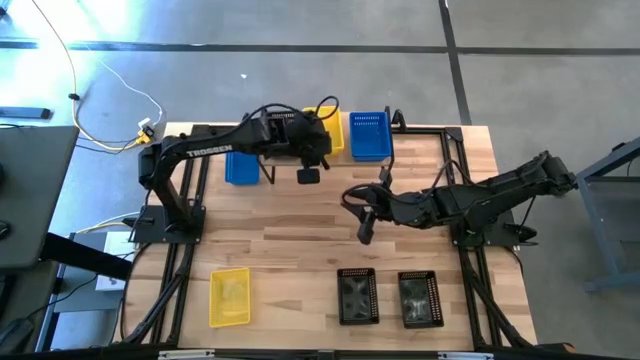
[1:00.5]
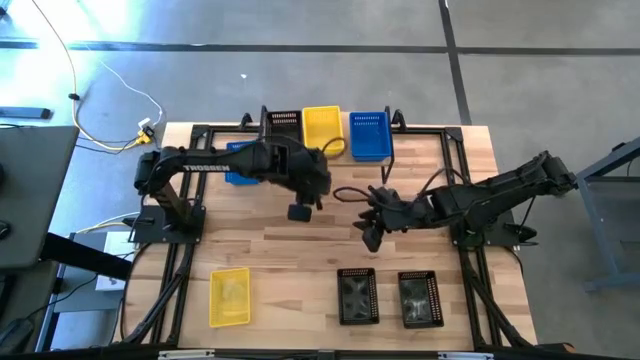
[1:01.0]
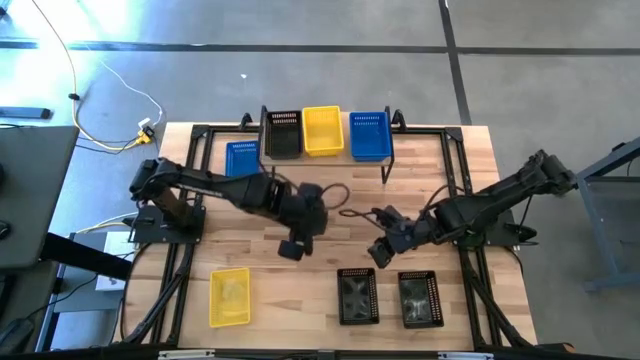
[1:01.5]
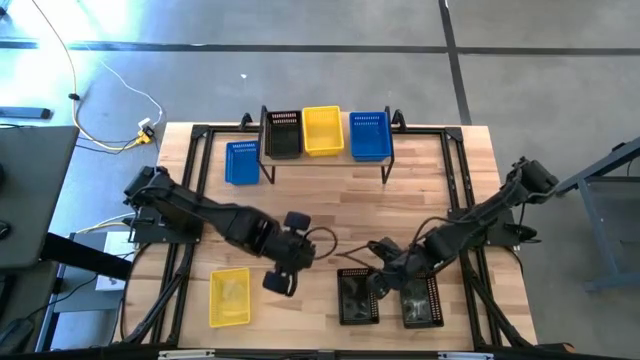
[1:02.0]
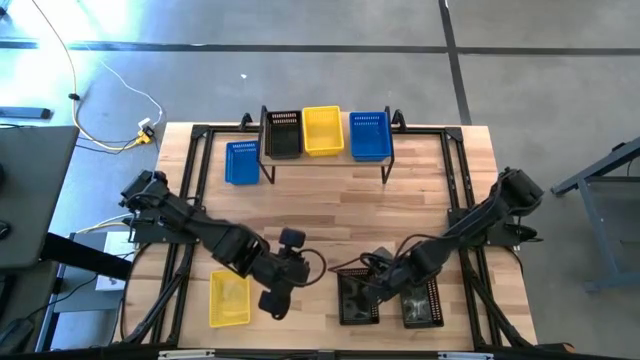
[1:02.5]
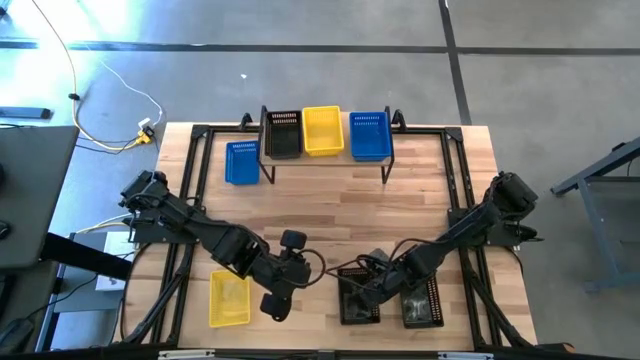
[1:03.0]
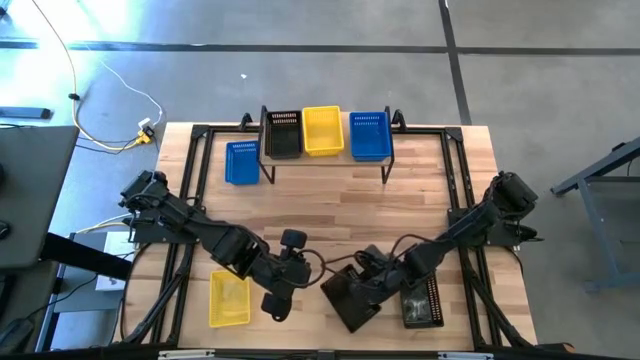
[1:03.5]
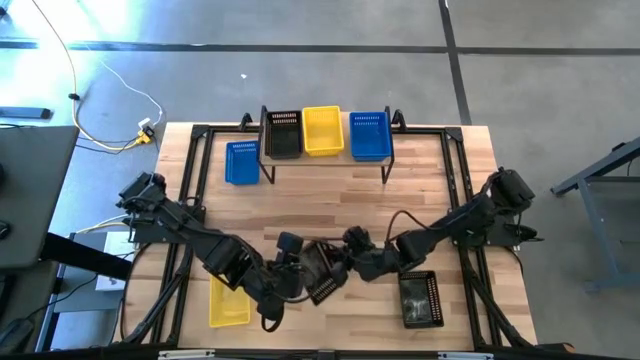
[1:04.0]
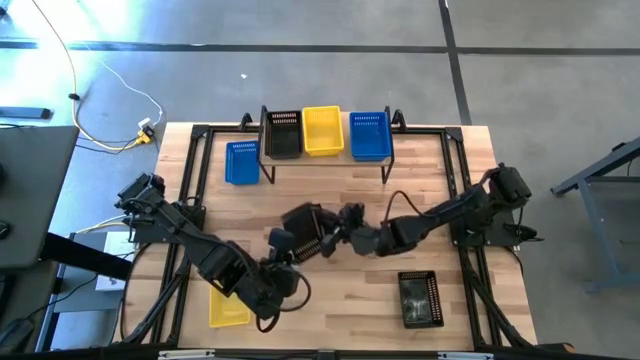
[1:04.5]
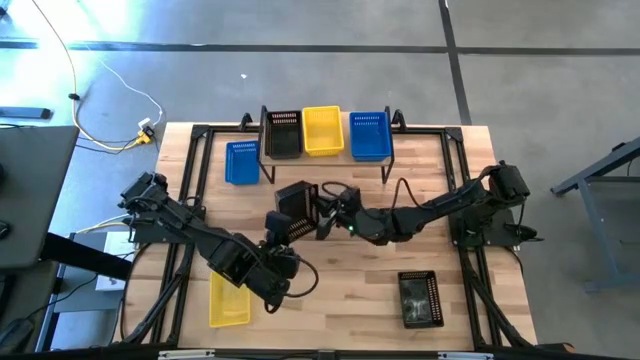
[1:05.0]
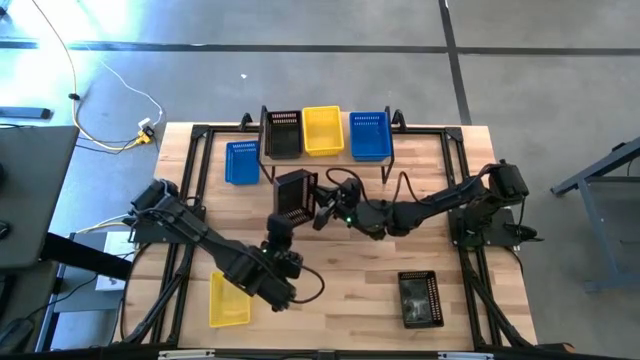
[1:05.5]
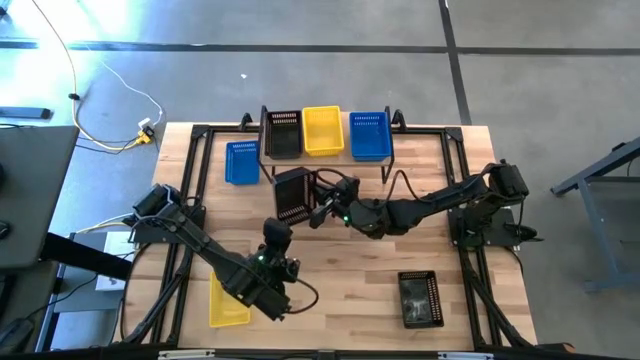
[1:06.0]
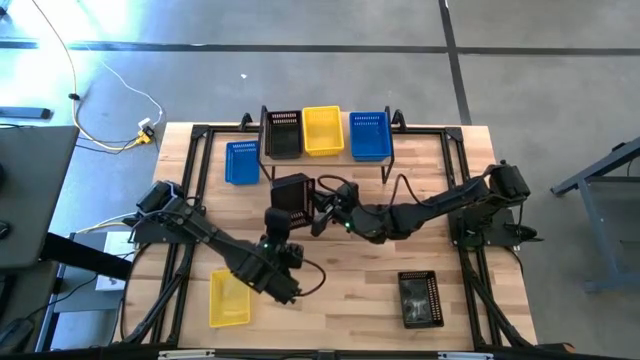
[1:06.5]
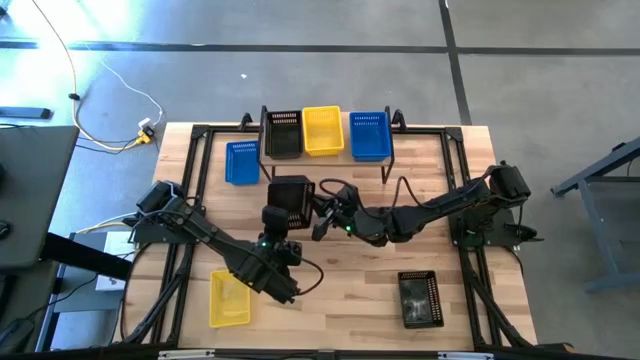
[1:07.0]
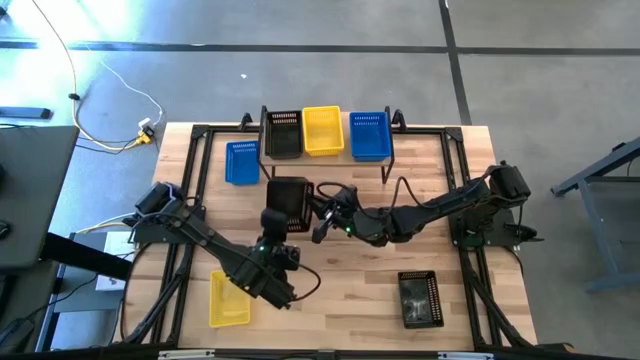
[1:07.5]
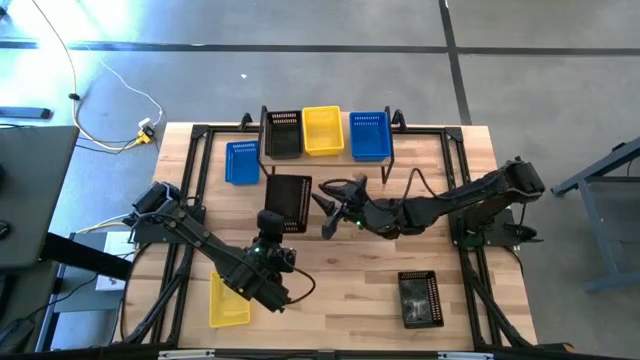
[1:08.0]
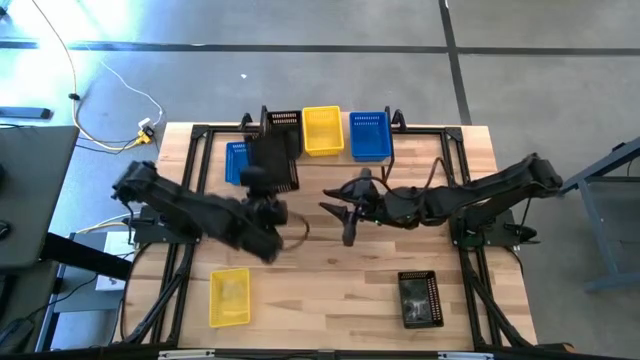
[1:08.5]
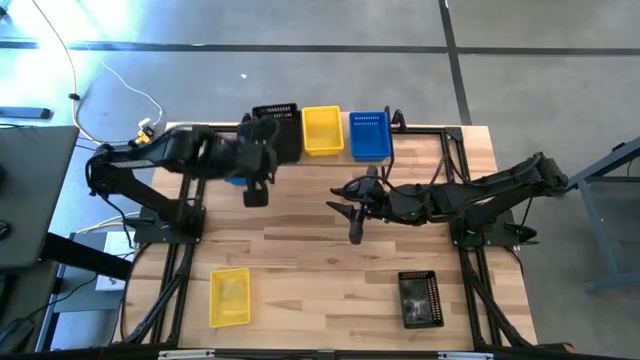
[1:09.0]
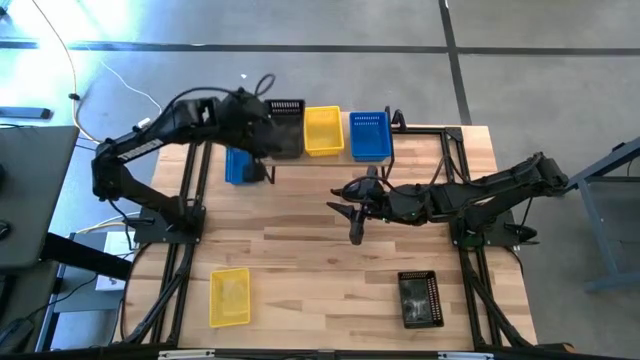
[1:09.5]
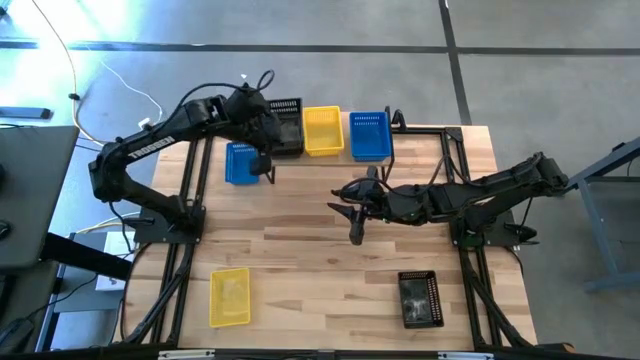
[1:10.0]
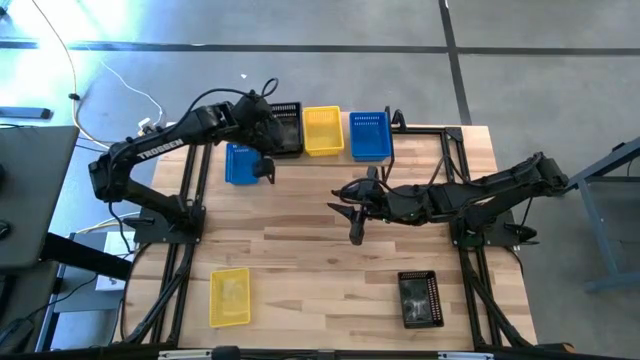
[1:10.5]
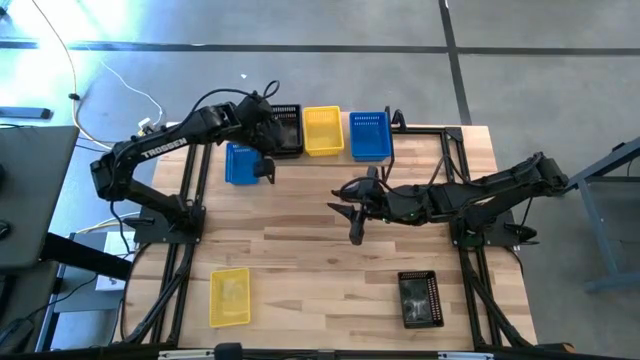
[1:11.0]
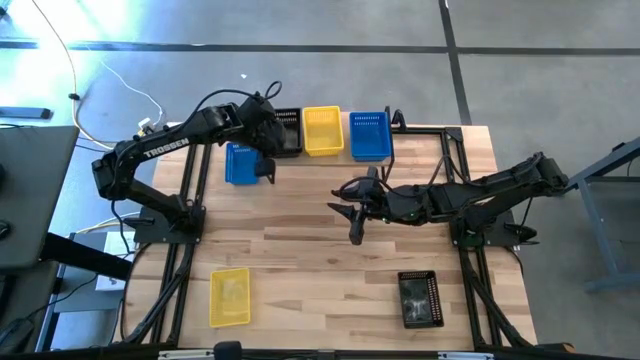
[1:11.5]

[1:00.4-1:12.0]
Task: Stack baskets on shelf by color
Stack the center black bin on top of the black bin on the shelf

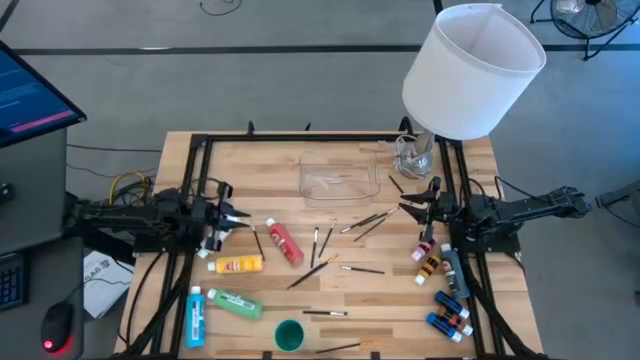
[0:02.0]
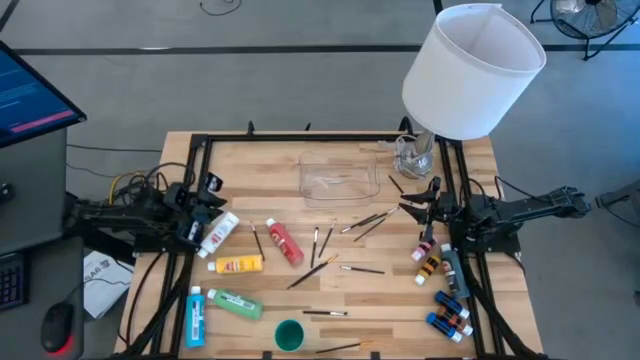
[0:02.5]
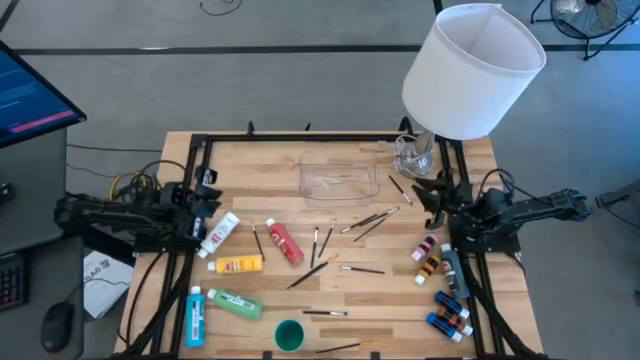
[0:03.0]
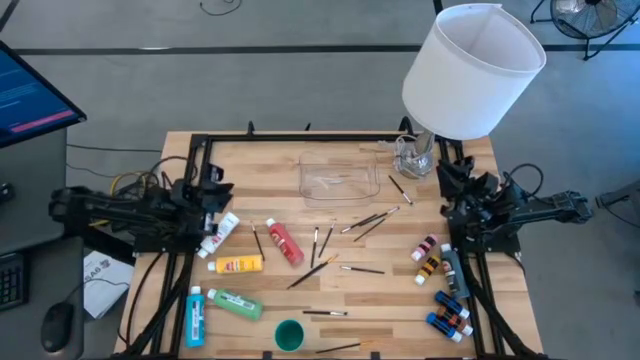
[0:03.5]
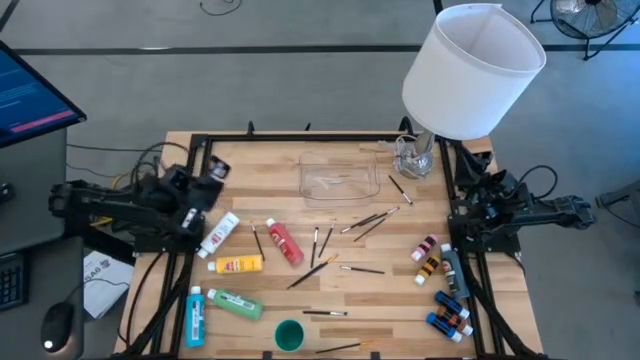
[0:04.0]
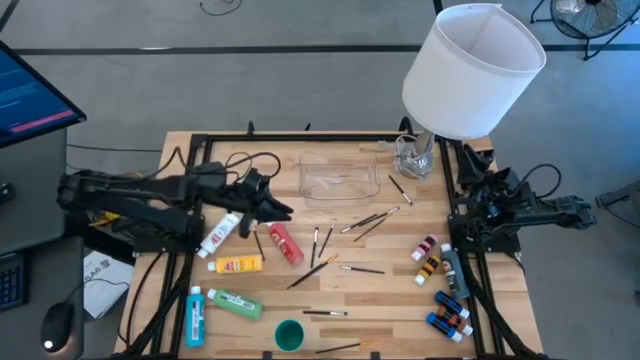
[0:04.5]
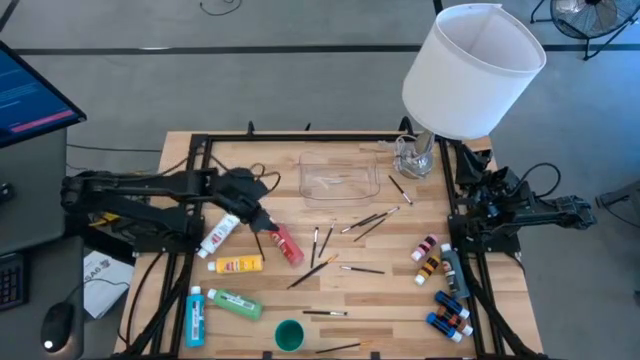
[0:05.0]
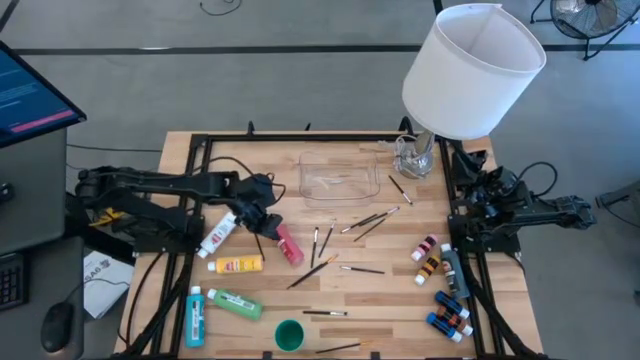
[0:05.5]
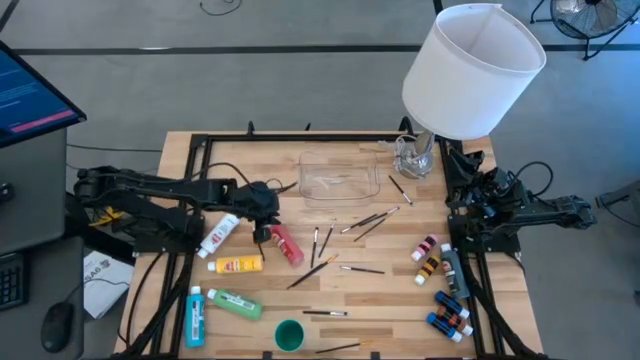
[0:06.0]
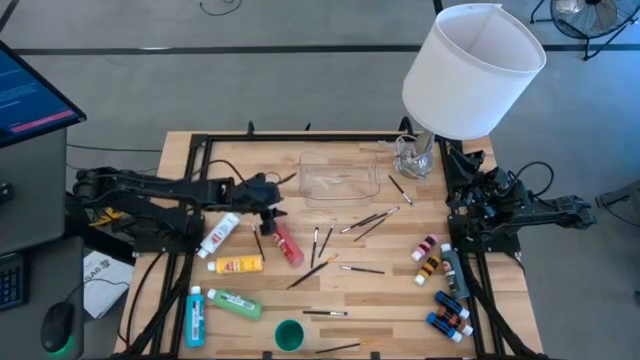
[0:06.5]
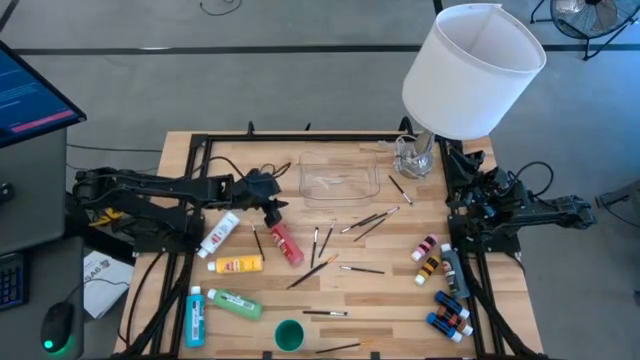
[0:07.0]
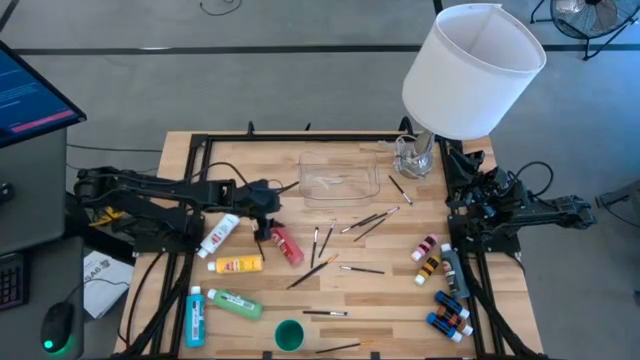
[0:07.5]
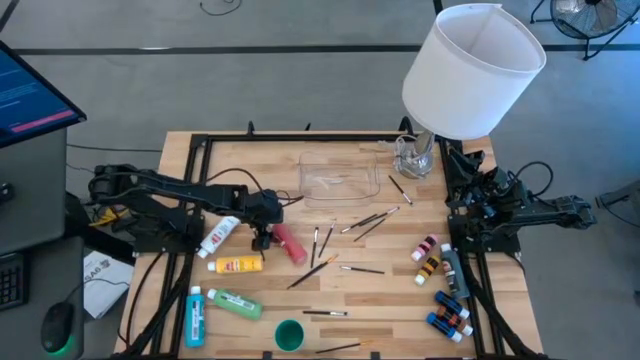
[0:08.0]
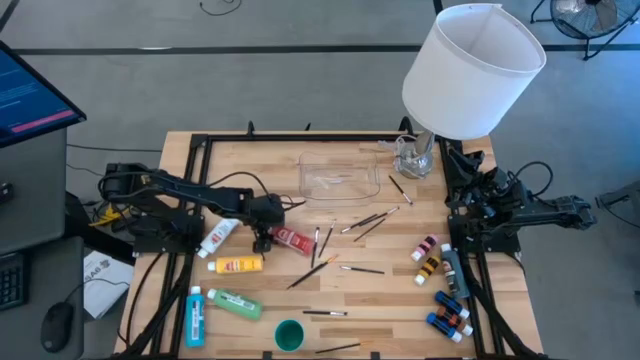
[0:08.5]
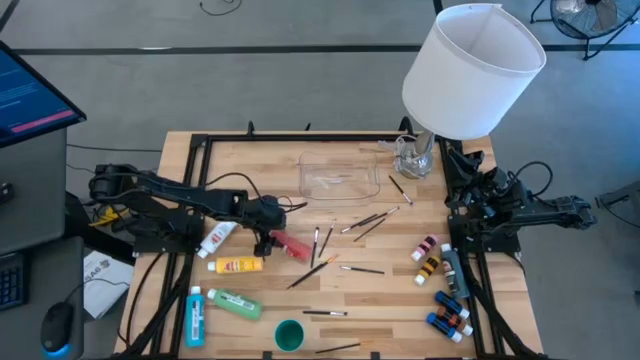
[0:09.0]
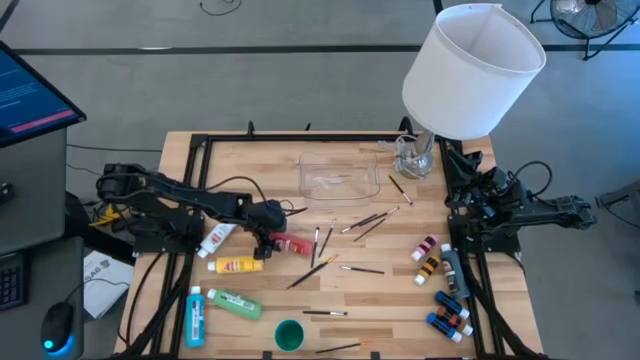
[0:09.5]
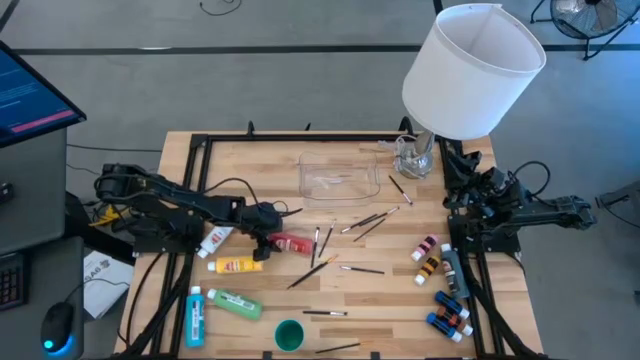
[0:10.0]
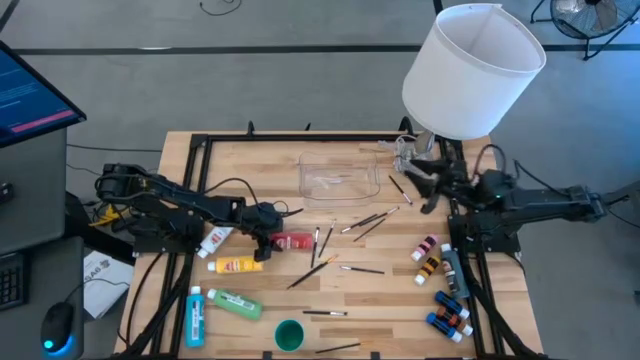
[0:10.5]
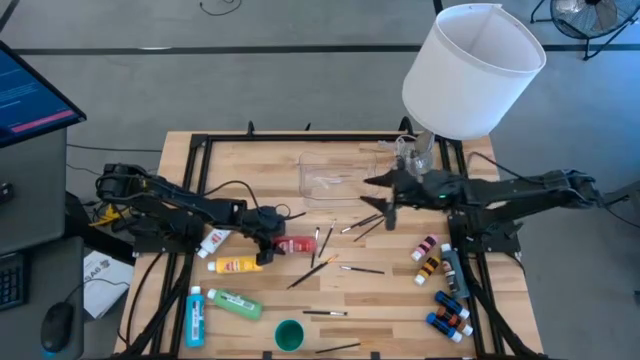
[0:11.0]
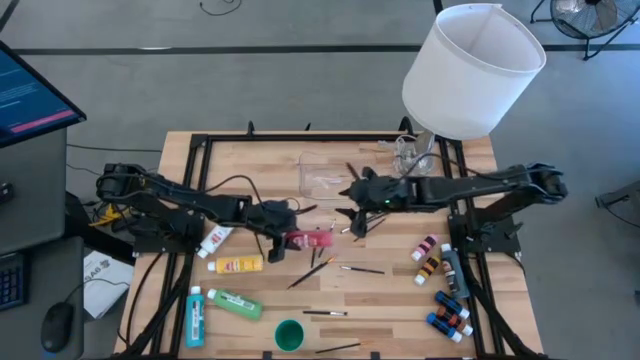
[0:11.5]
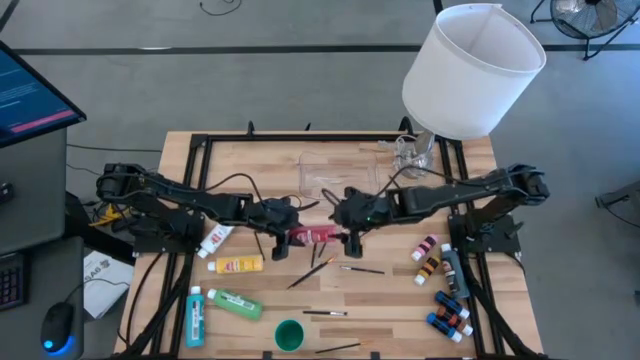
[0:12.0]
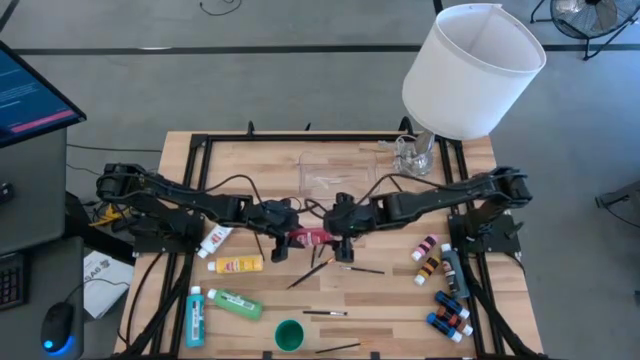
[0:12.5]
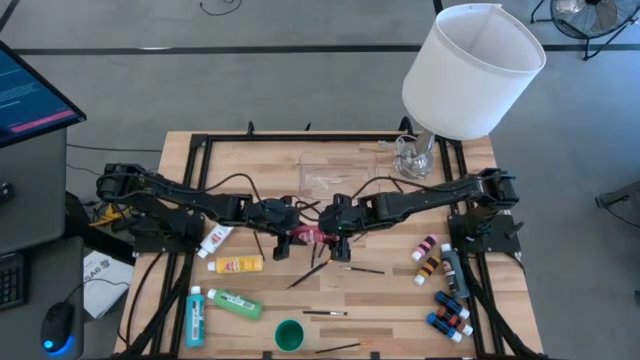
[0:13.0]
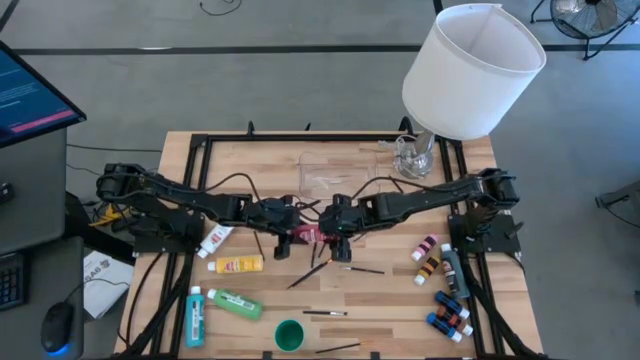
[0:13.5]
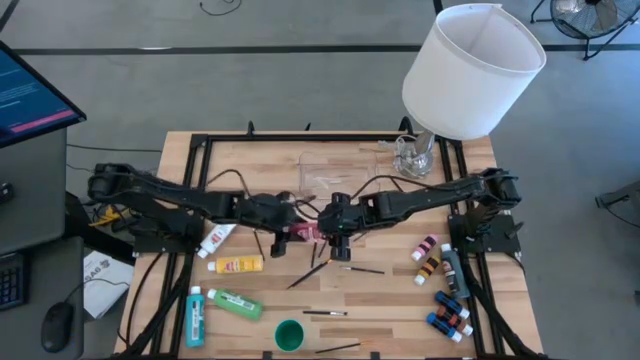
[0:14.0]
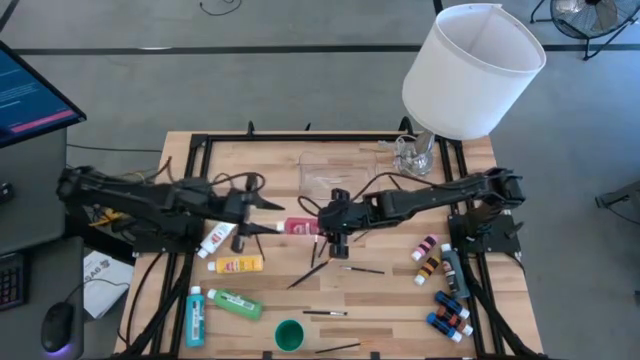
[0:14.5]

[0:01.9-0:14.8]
Task: Pick & Place Paint Supplies
Put the big red paint bottle into the transparent bin
